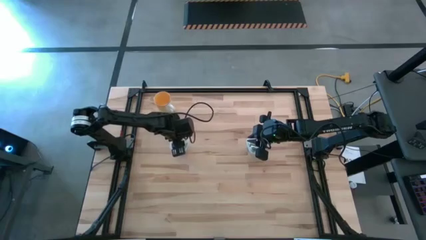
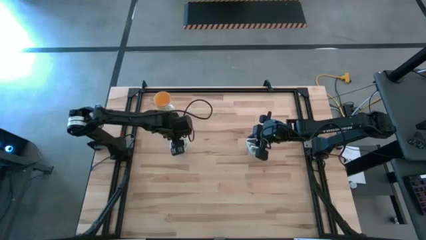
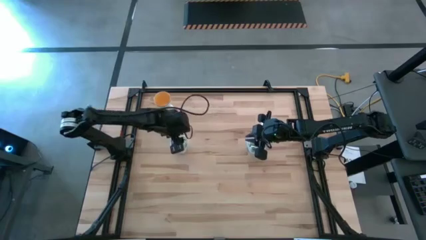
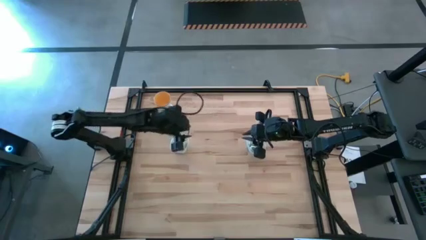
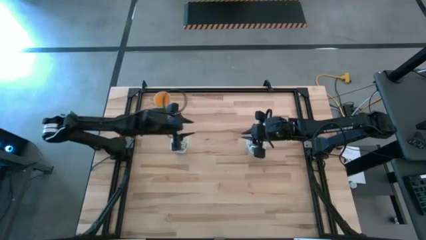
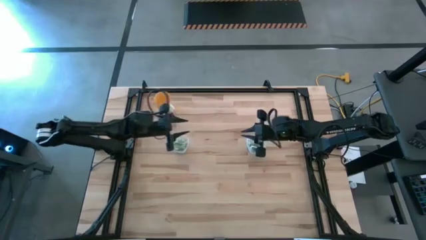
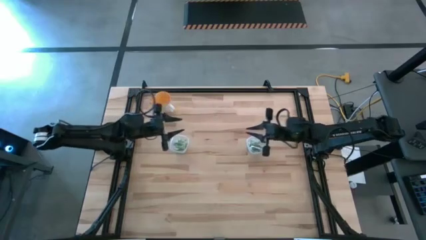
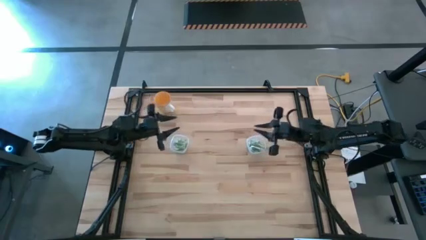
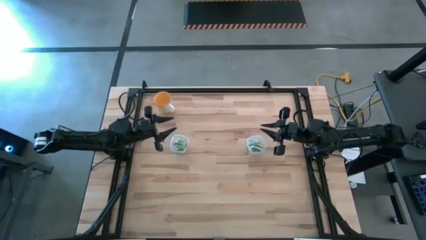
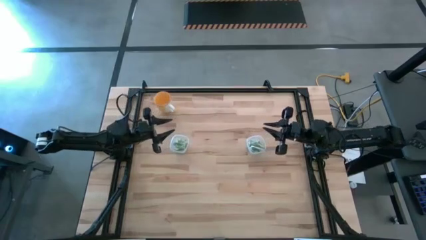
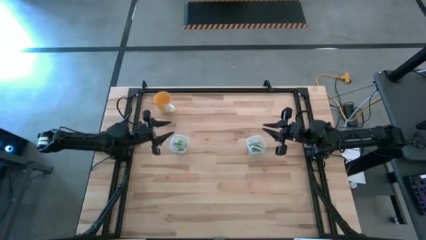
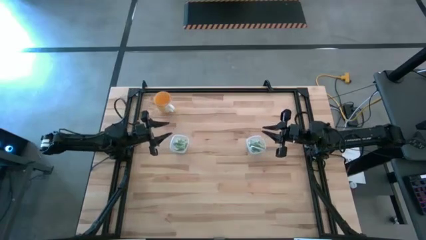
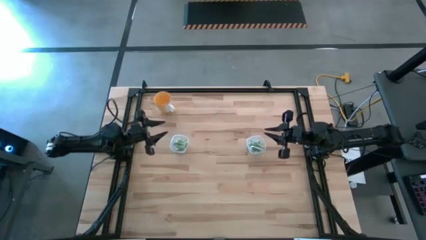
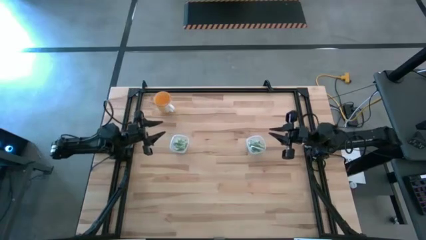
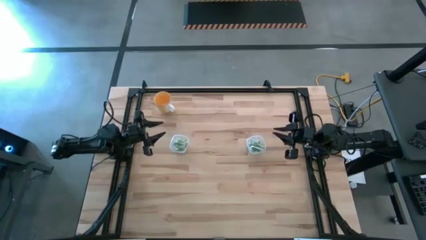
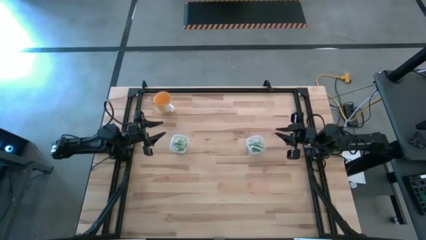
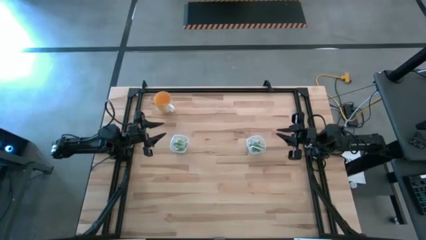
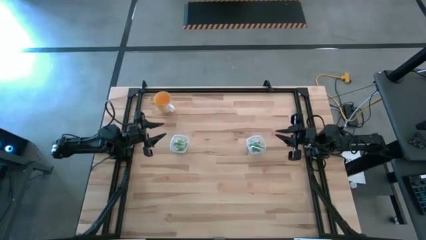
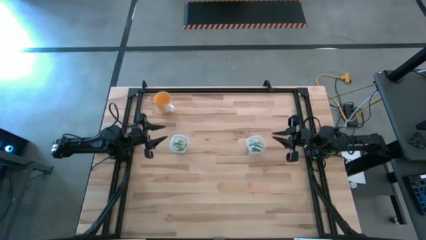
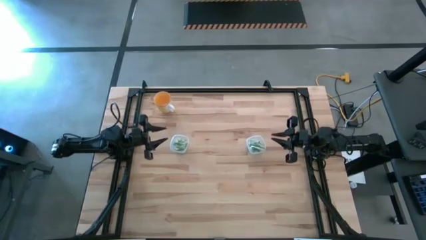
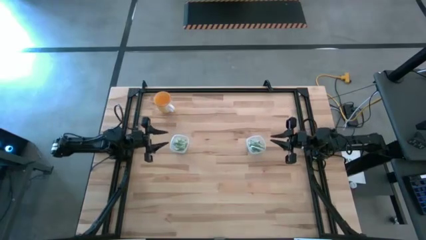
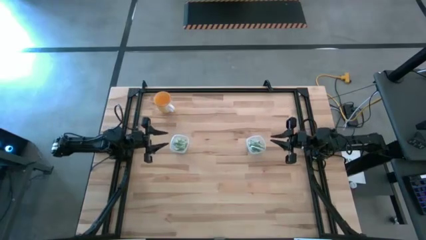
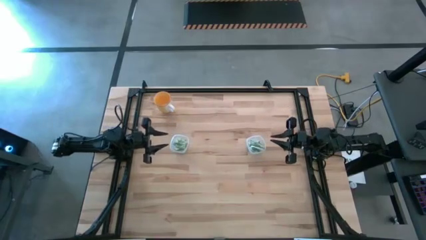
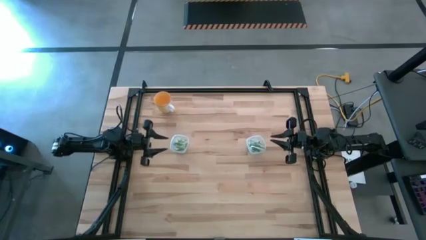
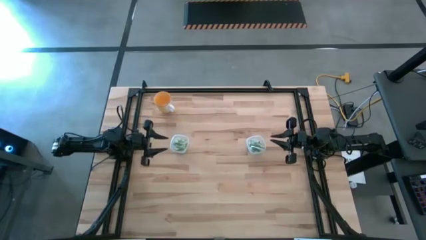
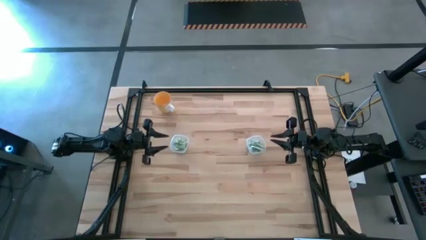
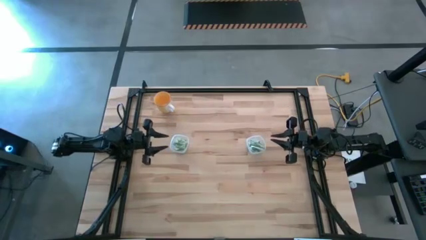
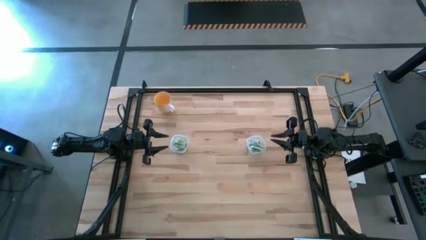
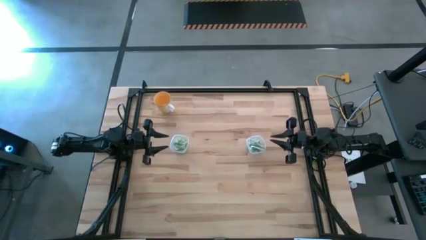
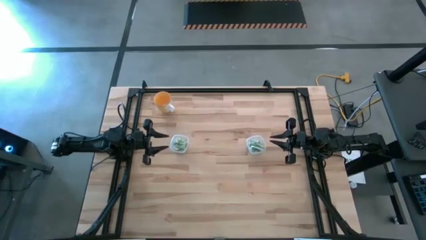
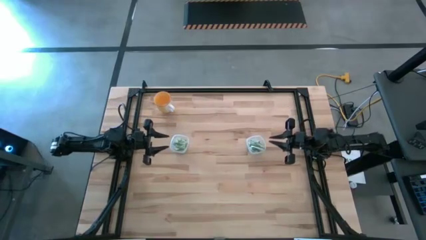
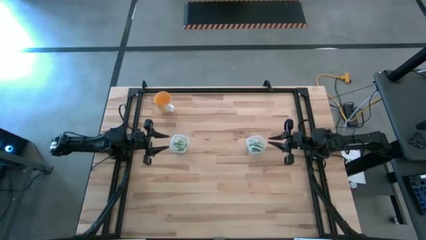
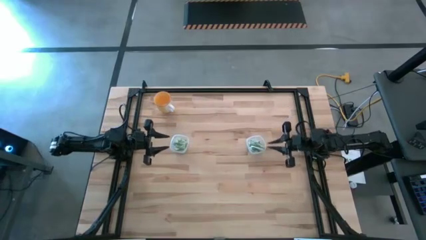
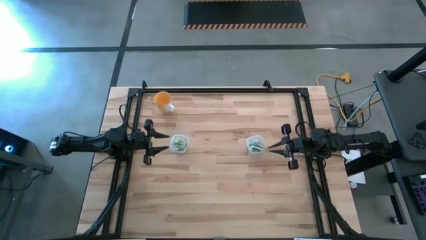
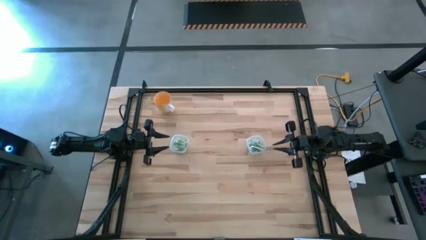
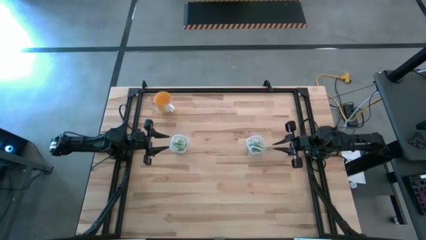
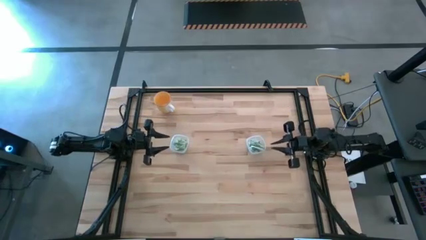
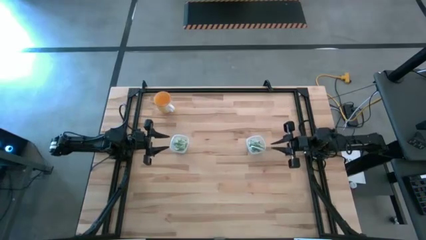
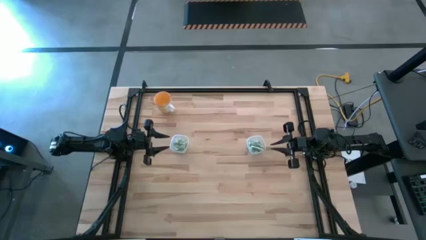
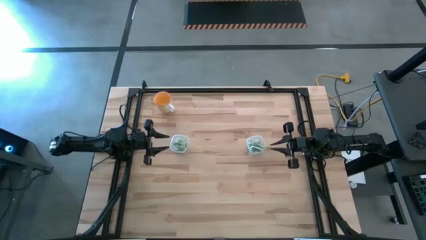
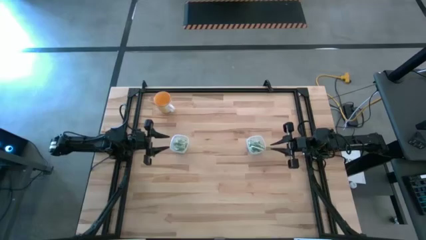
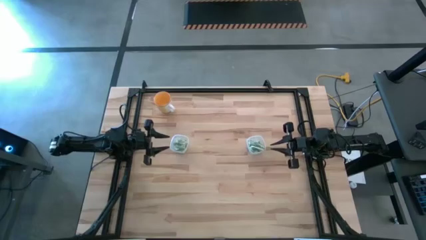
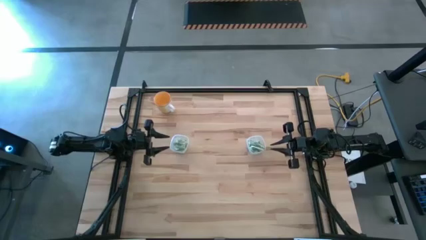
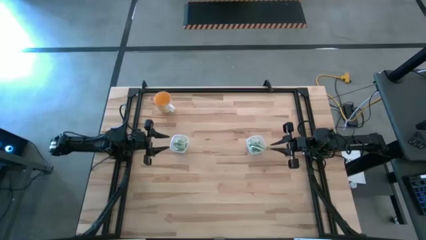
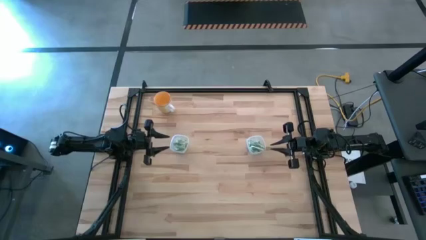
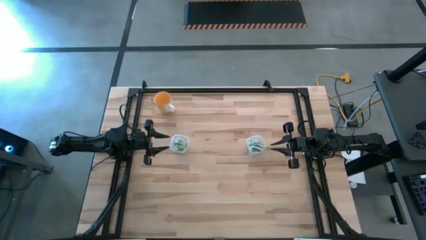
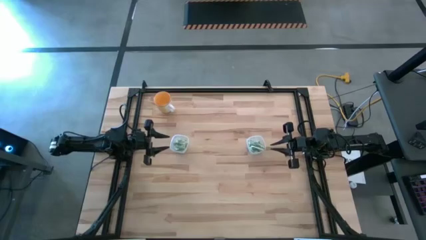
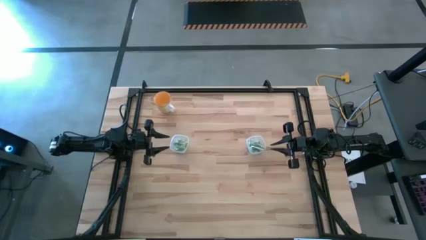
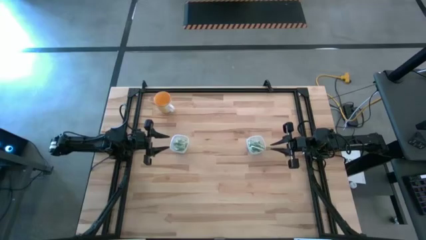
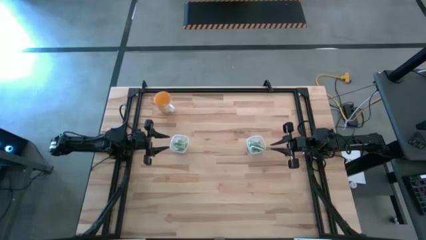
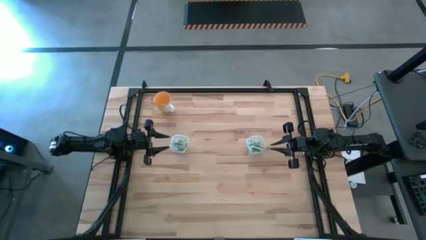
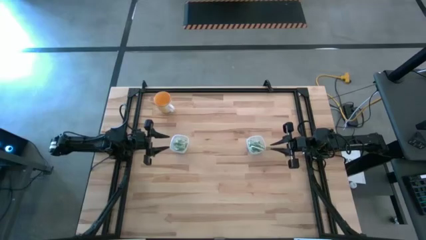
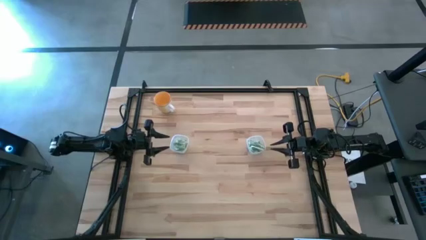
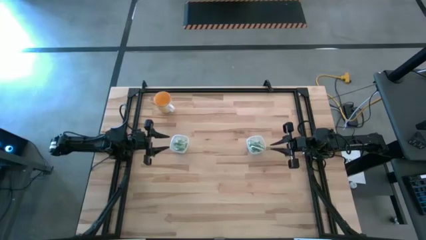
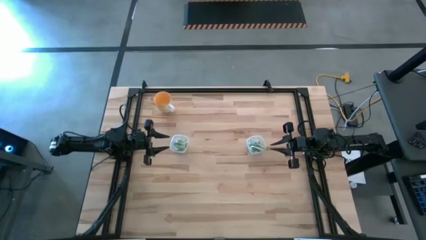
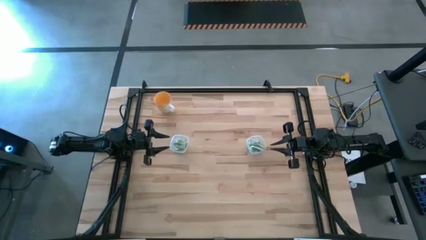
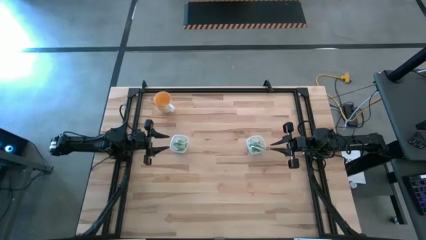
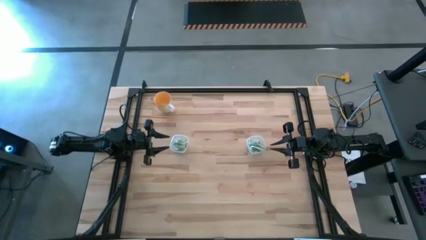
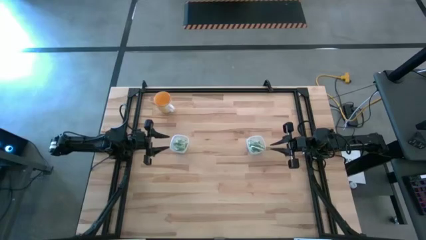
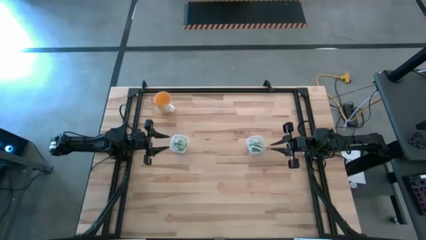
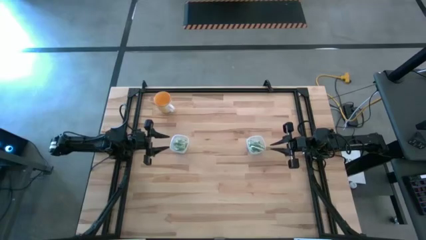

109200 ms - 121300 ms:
Task: Pick and place Stevia / Truvia into bins
Return to Home Position

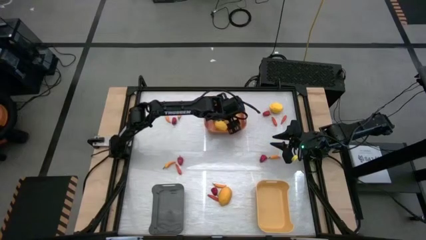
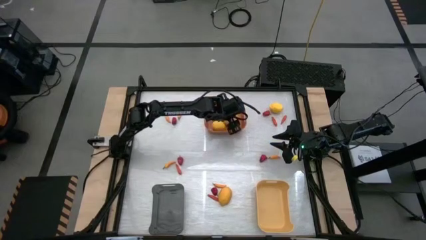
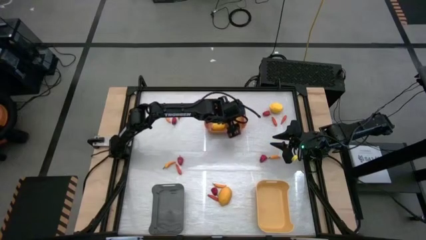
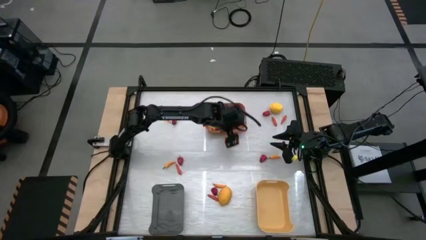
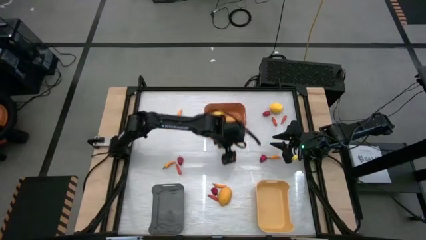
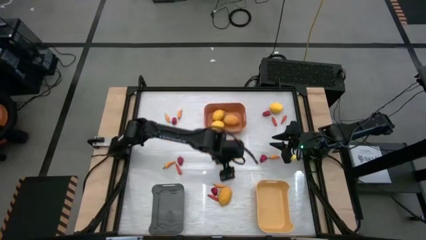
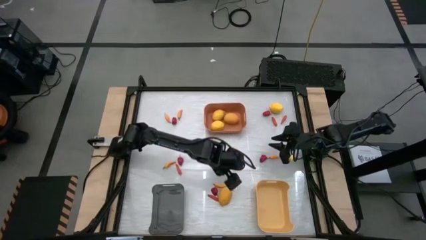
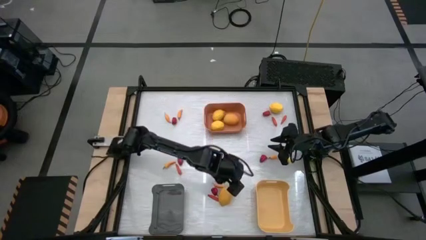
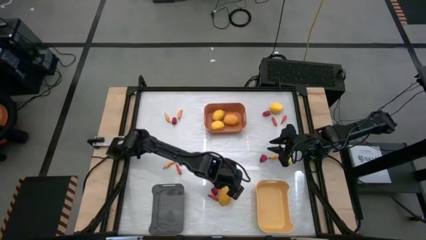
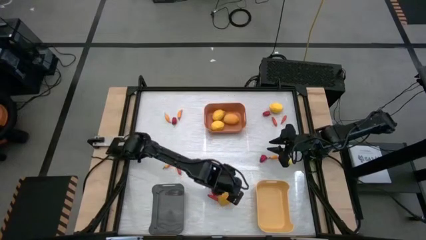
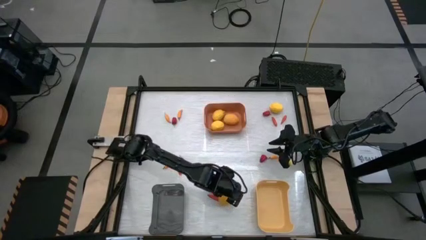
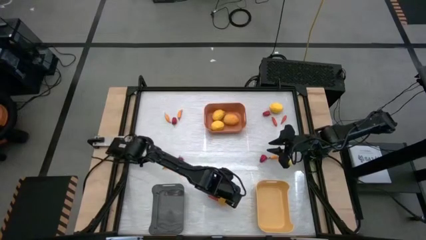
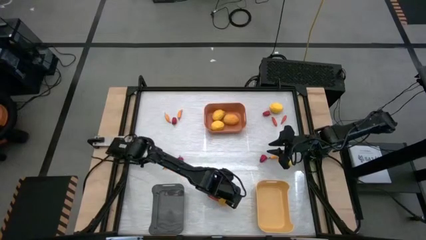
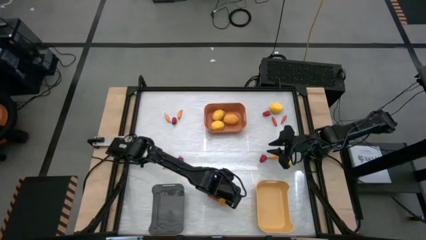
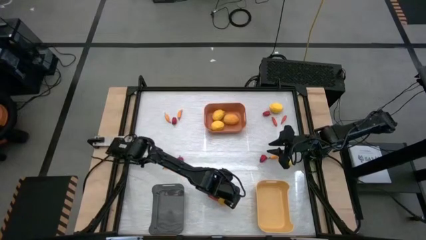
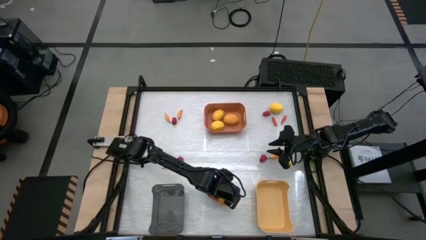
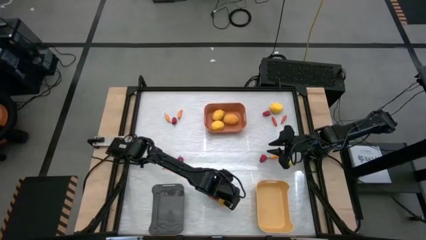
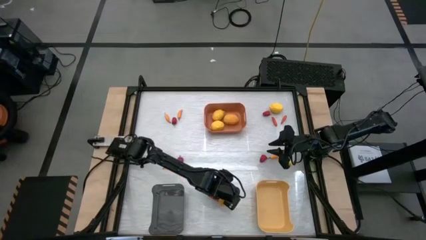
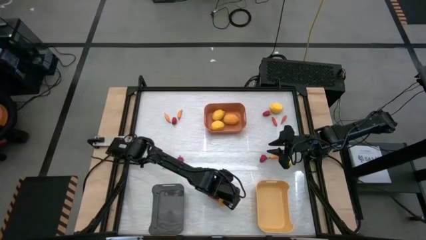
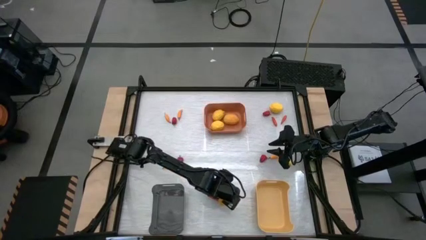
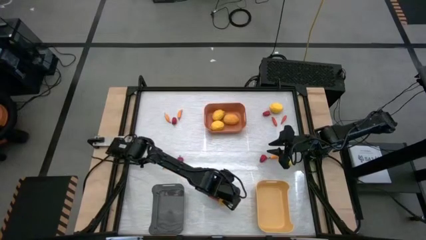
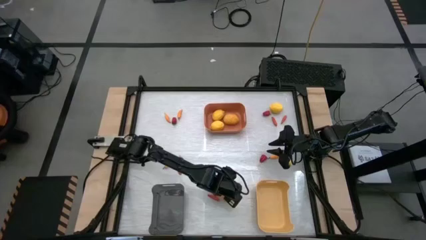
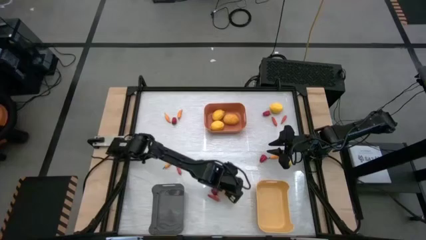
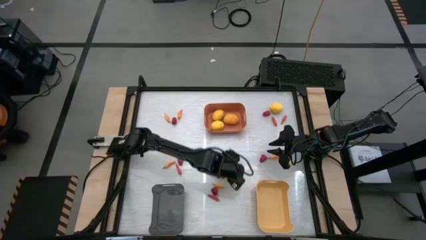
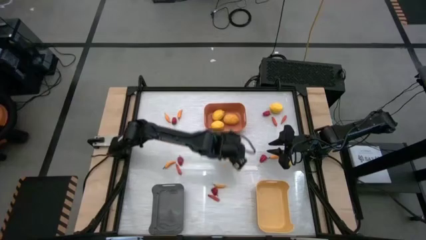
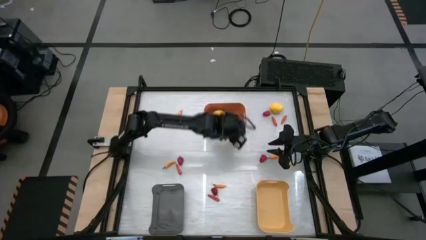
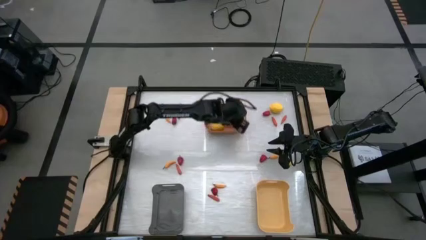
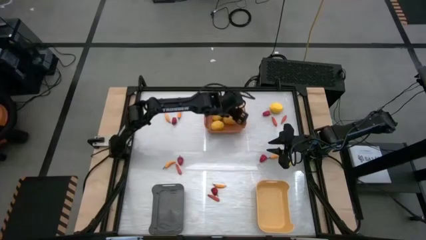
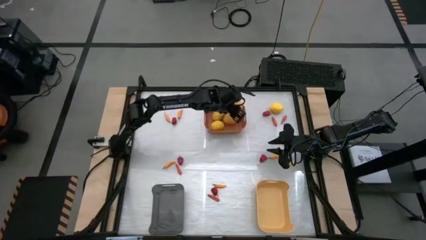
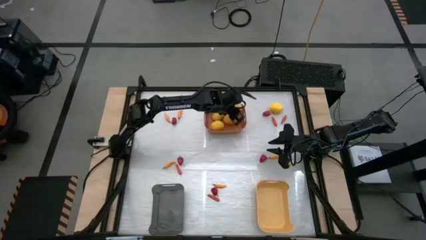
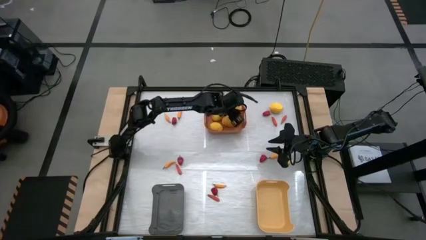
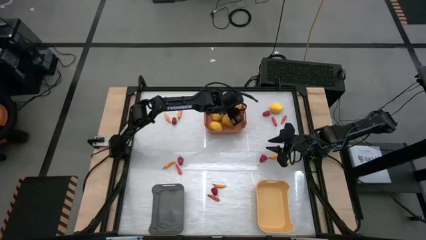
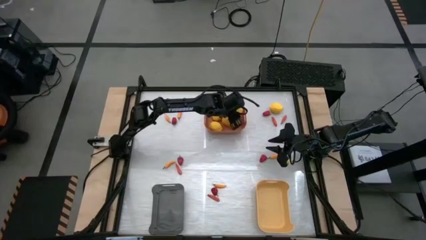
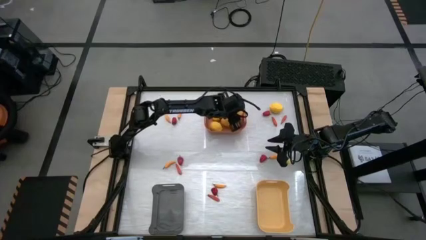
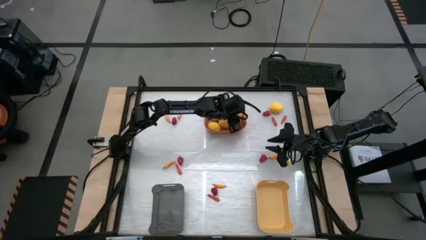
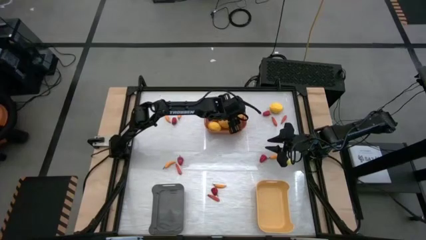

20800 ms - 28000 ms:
Task: Sort produce into baskets
Put the yellow lemon into the orange bin
